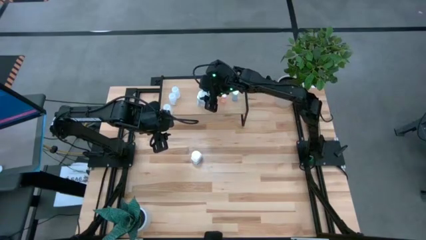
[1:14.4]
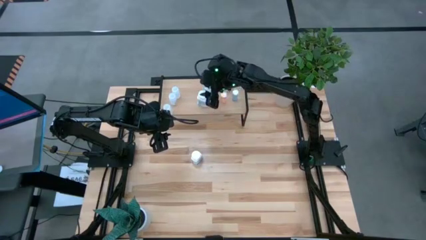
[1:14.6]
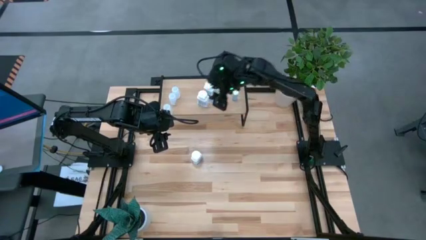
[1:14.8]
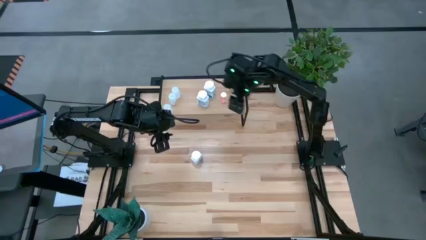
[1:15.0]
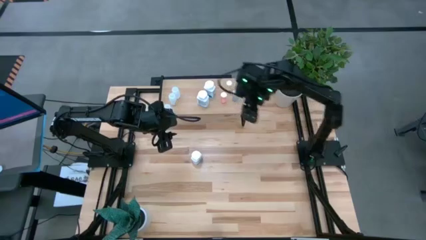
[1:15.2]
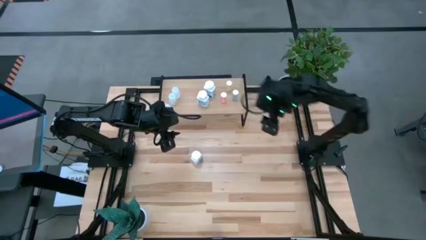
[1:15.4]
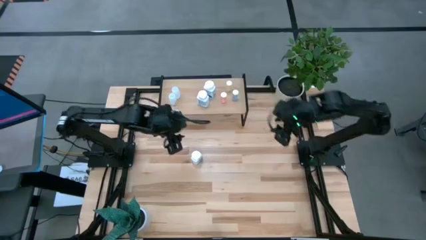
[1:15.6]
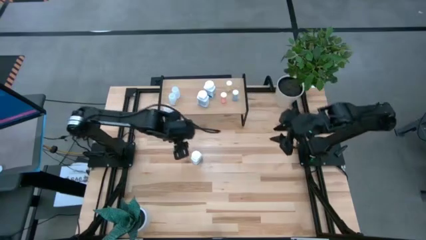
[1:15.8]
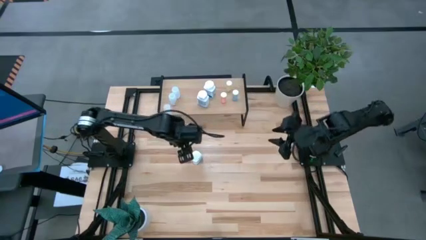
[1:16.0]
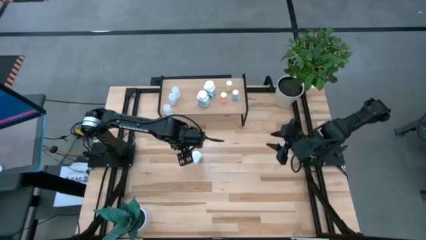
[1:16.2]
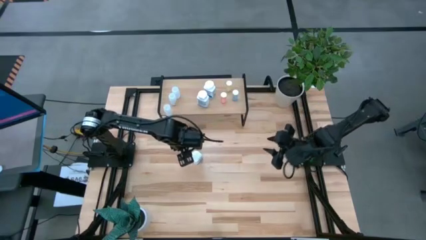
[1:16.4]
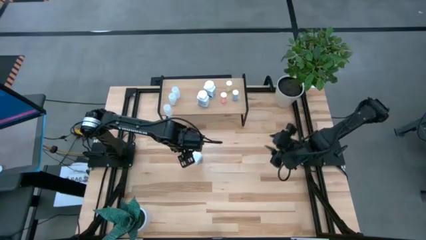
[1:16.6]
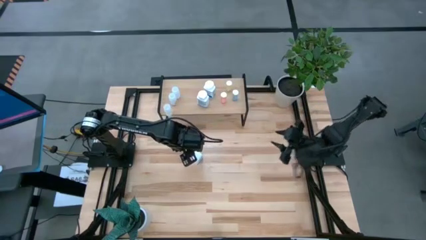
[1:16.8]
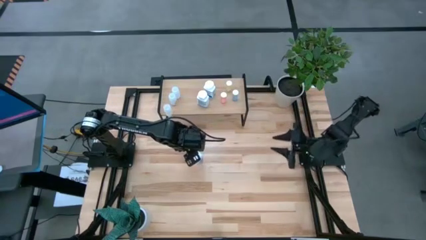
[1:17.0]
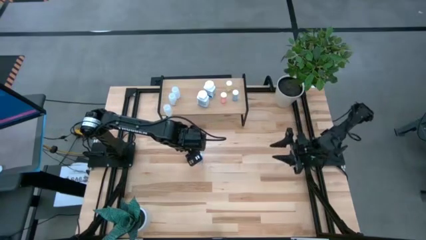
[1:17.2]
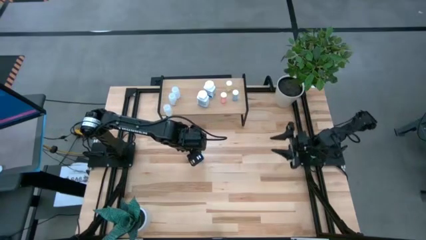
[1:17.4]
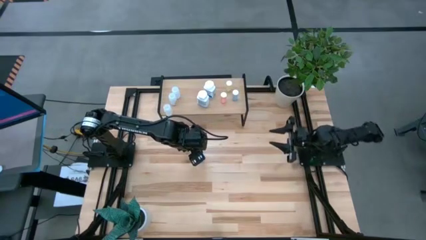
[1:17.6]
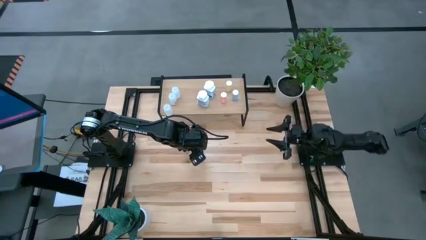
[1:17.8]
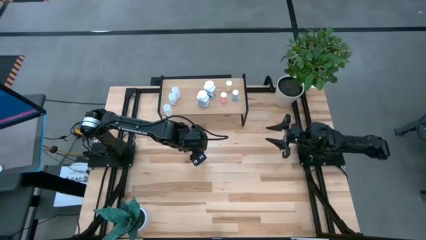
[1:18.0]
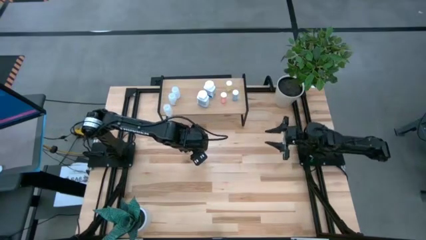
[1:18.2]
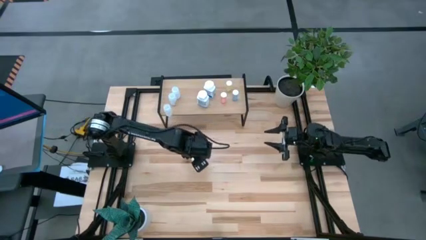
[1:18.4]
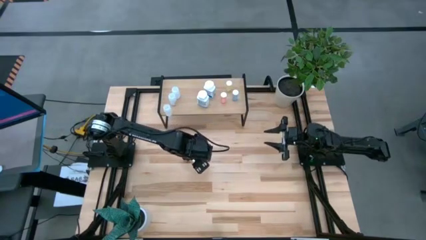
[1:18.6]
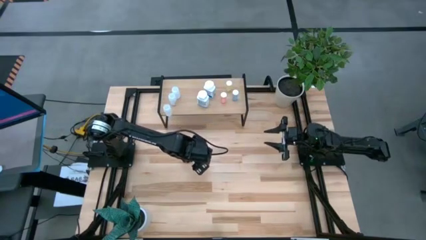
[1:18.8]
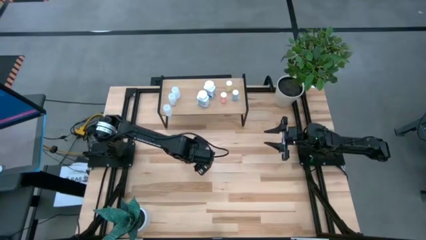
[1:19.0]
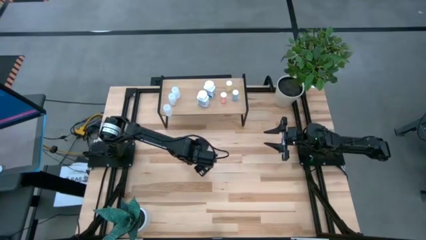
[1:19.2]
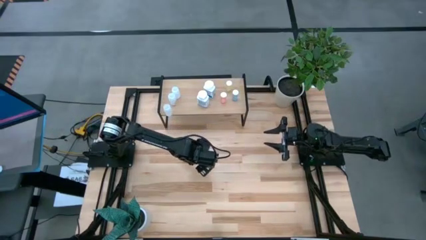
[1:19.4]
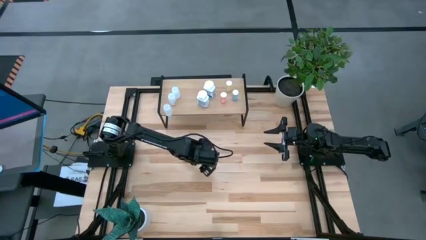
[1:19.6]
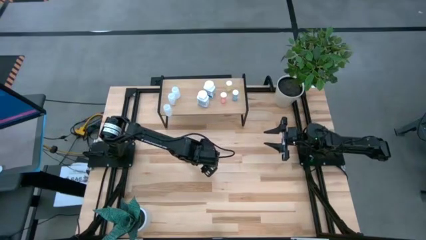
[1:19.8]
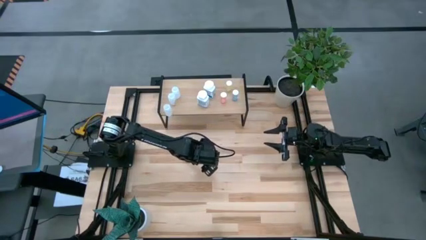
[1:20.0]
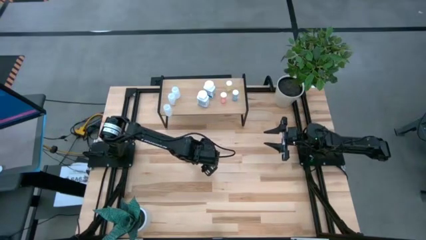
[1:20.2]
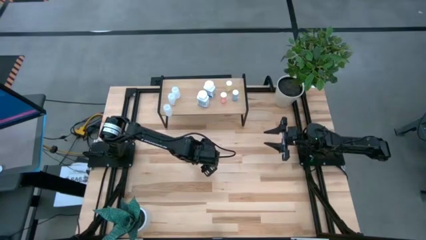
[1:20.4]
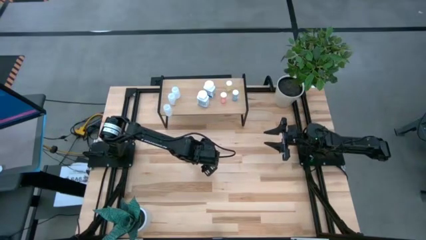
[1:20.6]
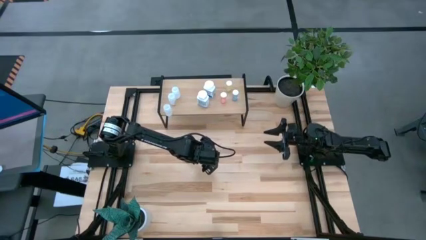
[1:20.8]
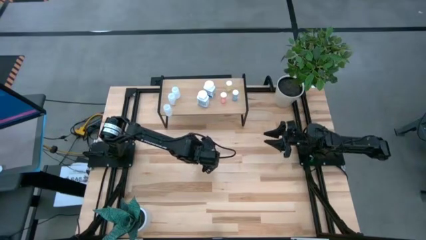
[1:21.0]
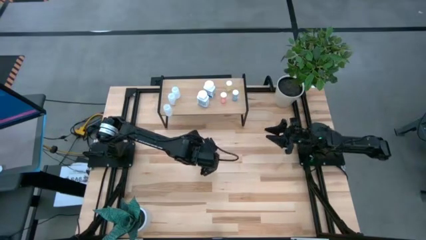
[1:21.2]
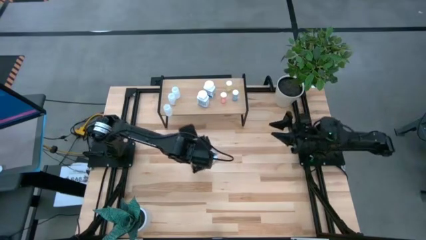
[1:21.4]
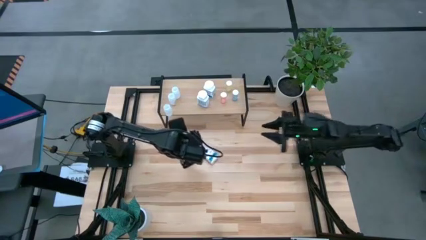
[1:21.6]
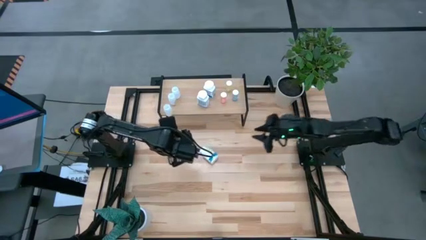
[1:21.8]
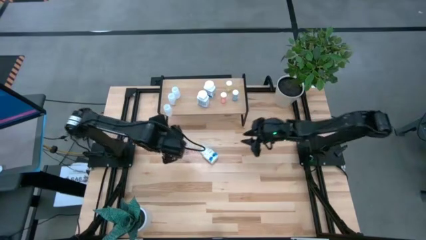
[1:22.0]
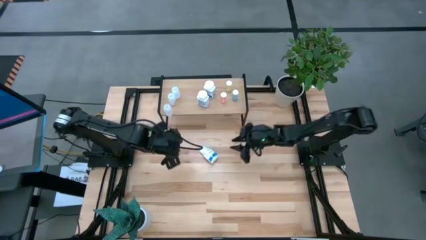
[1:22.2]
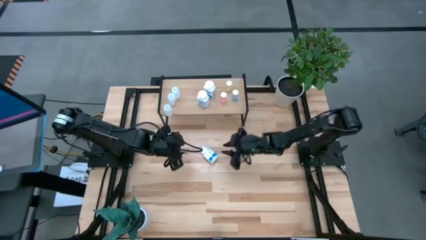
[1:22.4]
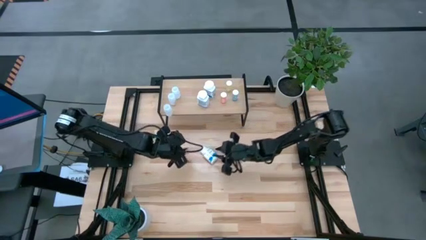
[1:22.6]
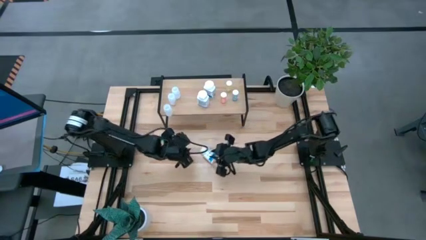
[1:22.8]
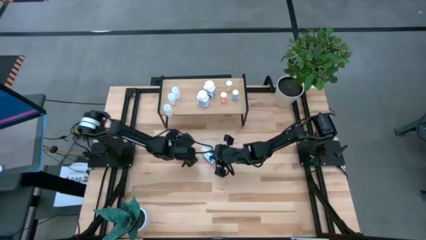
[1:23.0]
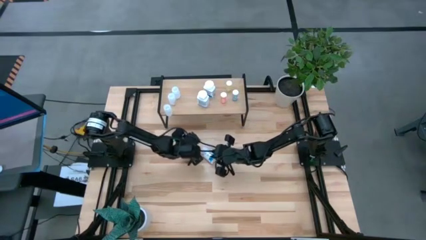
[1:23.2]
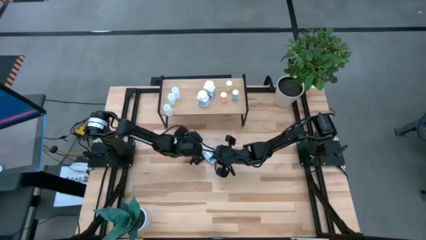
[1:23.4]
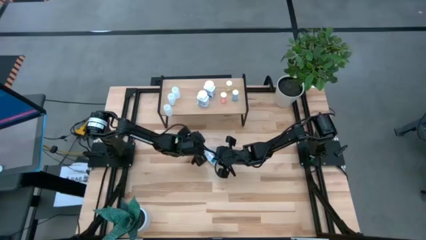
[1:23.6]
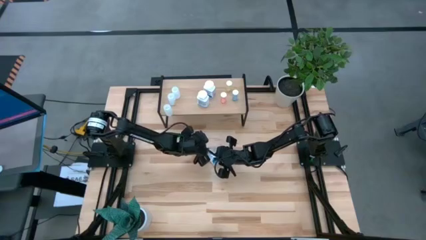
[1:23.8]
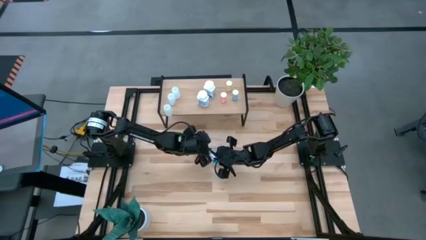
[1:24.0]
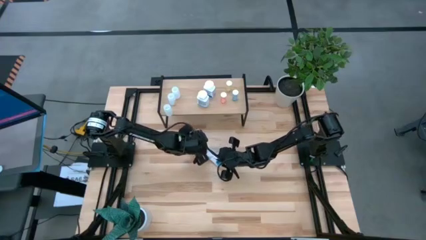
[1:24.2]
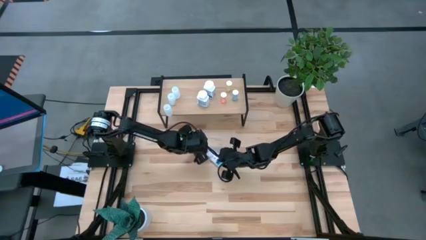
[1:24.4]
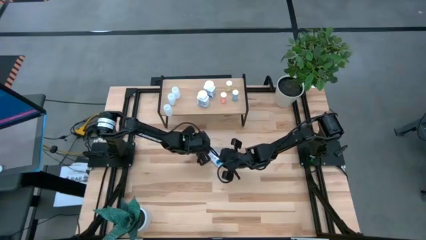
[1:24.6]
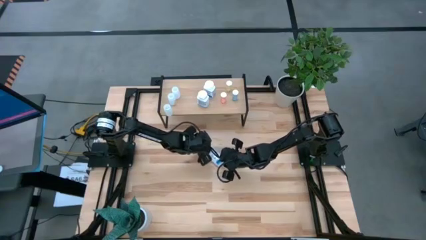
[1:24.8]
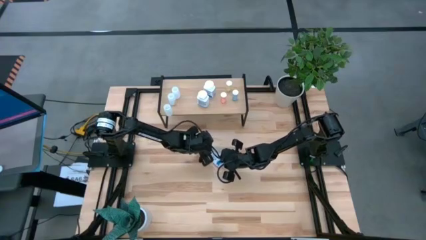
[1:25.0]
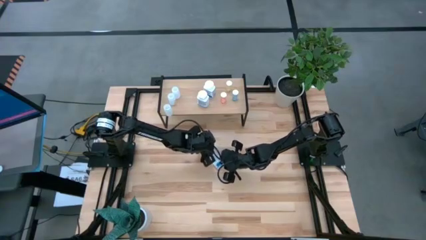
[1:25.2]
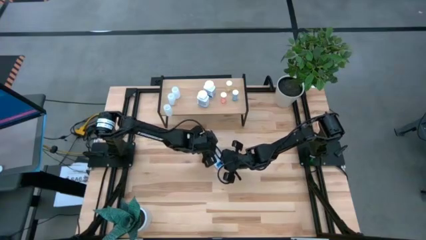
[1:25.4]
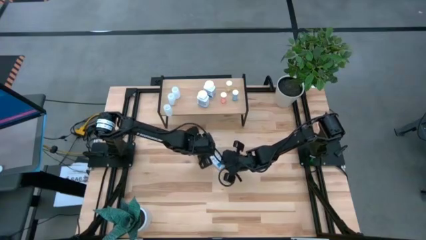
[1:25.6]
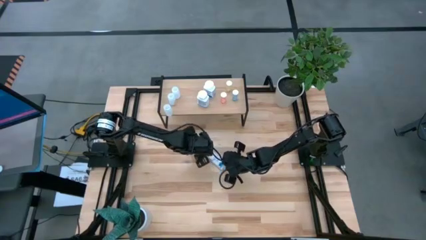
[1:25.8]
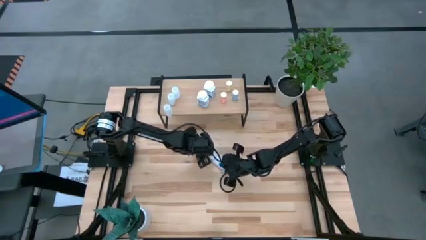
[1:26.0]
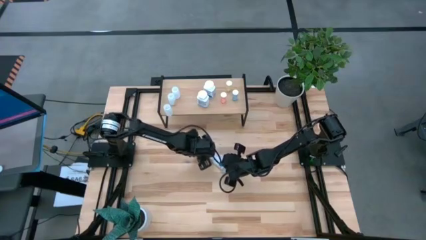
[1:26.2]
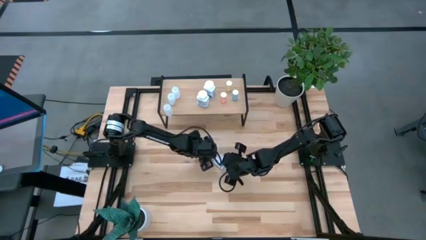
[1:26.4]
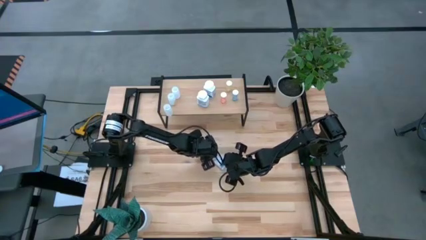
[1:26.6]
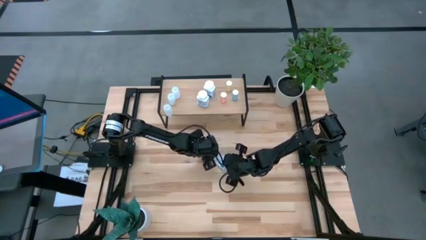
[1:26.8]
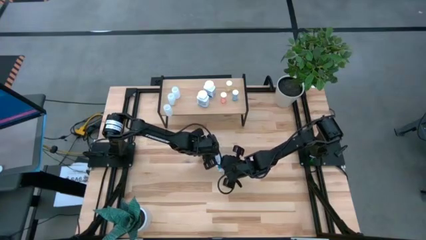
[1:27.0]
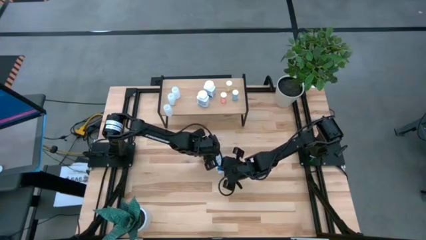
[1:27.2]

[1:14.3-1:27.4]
Task: Pick and place medicine bottles onto shelf by color
Put the white pill bottle on the shelf

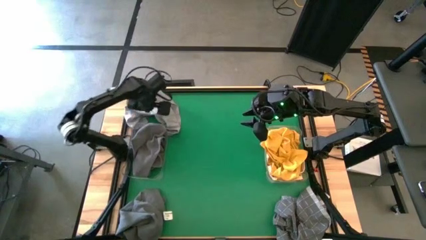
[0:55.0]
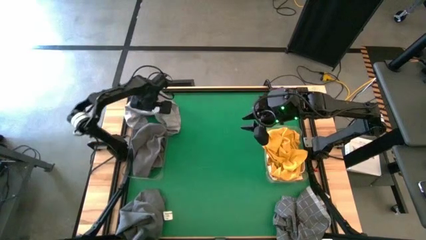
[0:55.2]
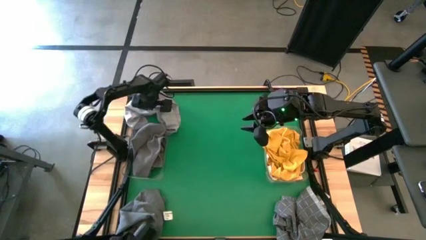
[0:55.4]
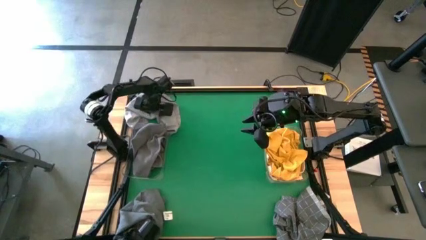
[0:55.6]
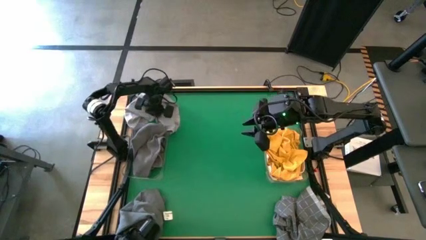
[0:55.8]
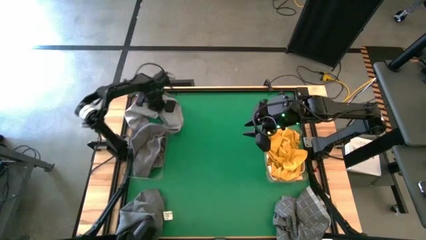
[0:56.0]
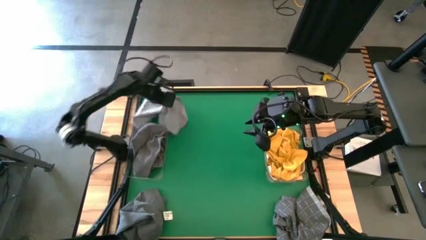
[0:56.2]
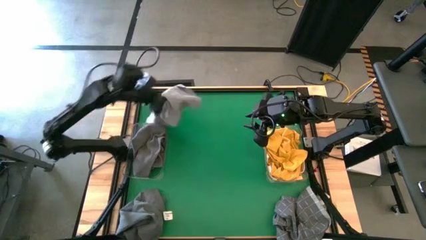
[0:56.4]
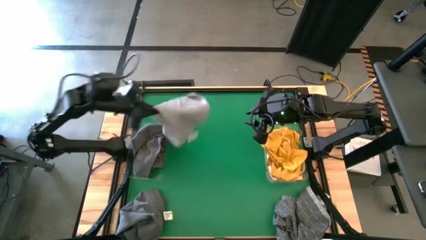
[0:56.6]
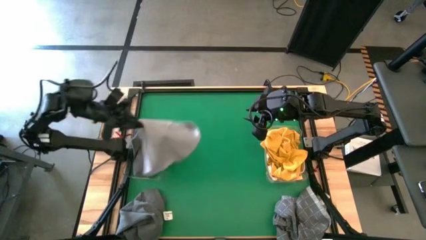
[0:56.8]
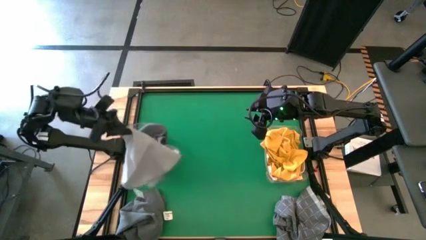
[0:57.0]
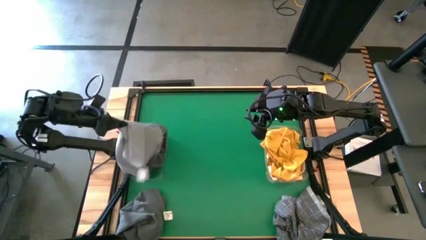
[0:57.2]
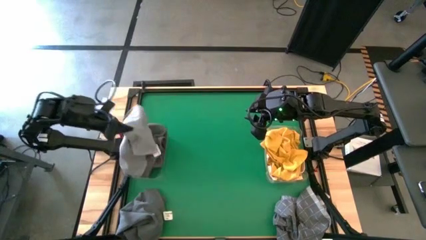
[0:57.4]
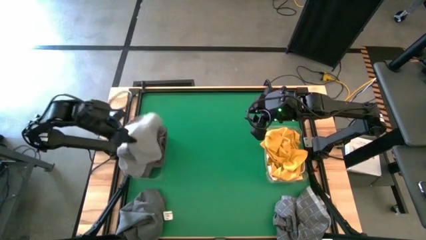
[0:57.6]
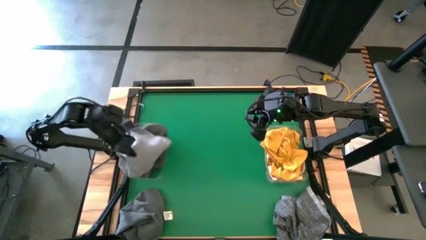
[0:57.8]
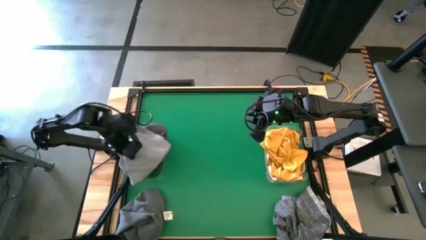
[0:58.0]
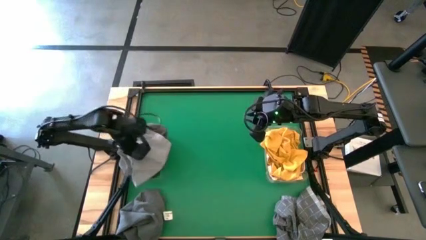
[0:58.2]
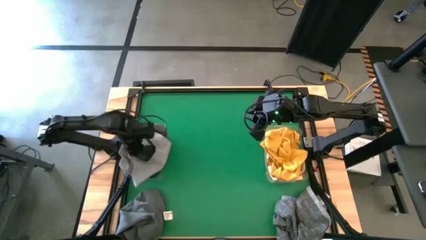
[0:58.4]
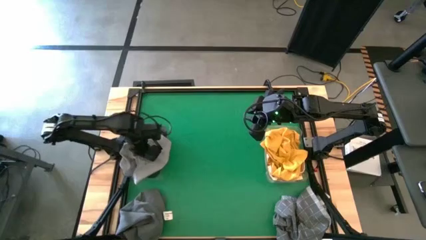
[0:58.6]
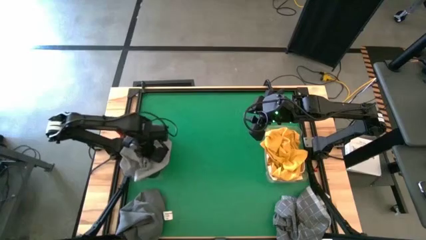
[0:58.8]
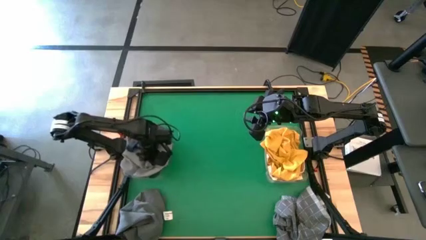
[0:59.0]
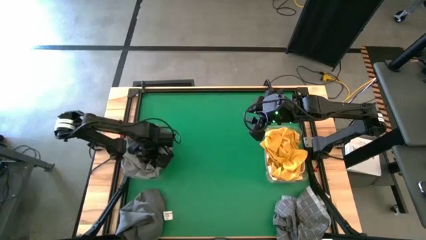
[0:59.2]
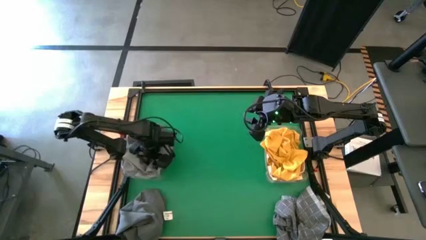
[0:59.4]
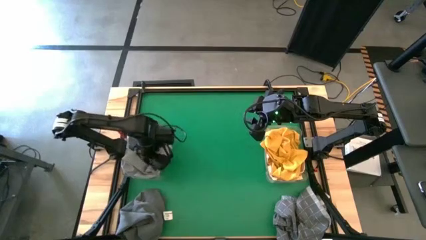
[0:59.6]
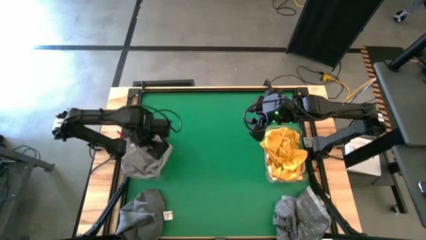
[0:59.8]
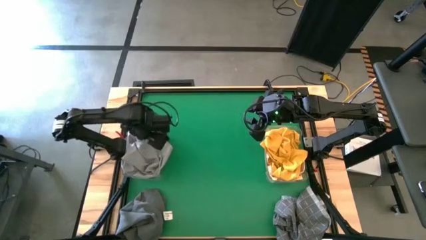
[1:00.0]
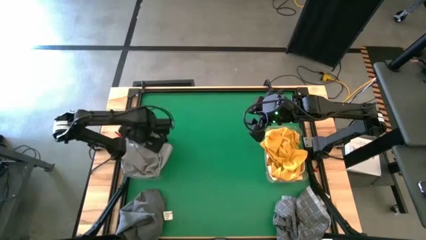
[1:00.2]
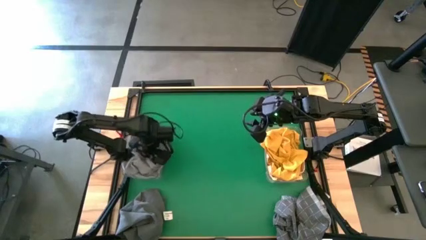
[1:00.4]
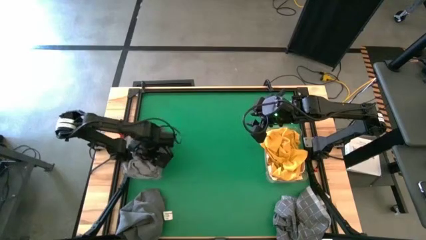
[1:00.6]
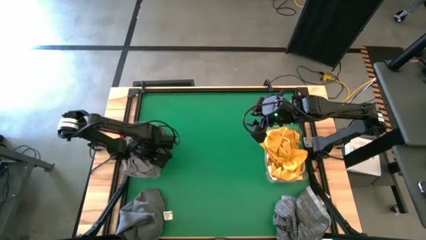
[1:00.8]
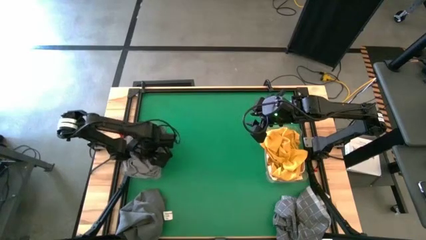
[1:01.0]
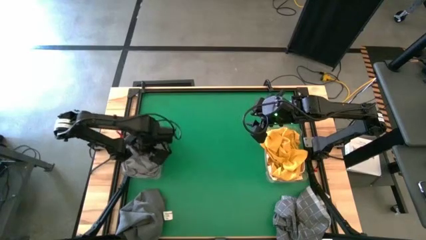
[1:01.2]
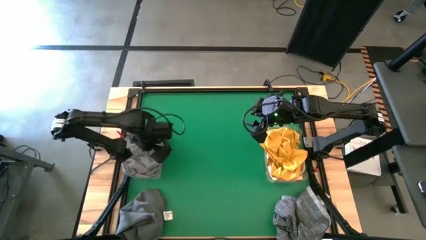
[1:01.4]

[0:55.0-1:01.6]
Task: Sort microfiber towel by color & place in baskets
Put the light gray microfiber towel into the left transparent bin
